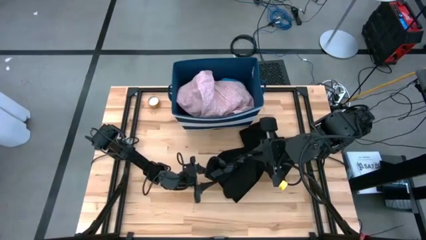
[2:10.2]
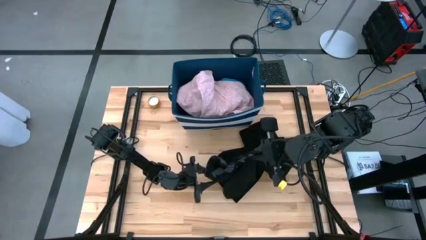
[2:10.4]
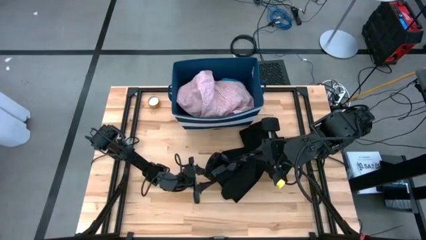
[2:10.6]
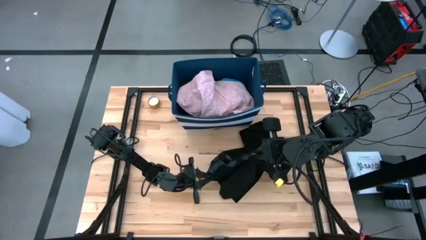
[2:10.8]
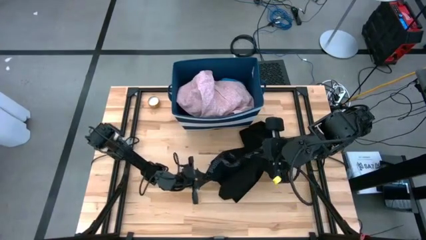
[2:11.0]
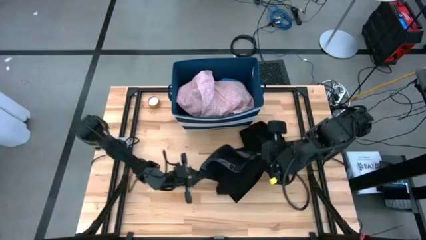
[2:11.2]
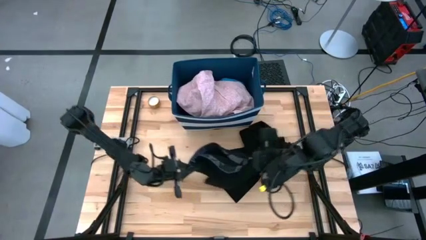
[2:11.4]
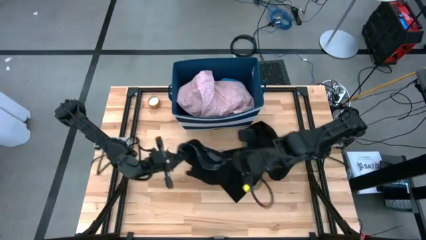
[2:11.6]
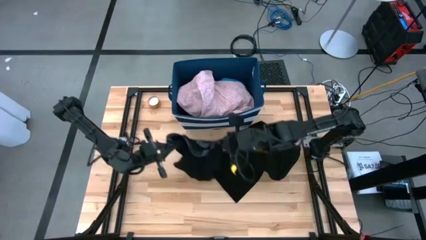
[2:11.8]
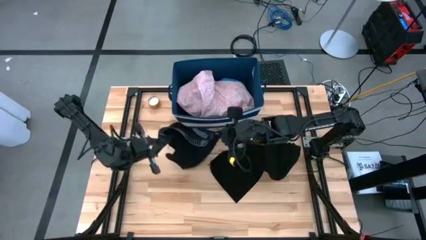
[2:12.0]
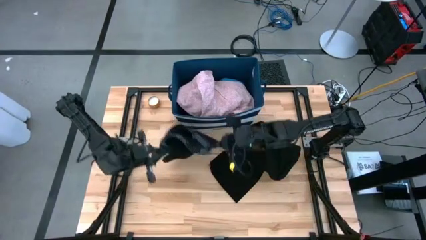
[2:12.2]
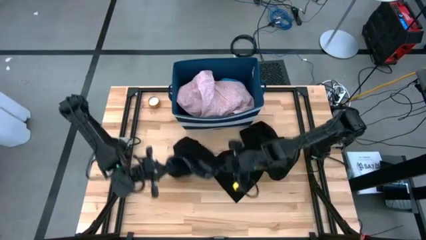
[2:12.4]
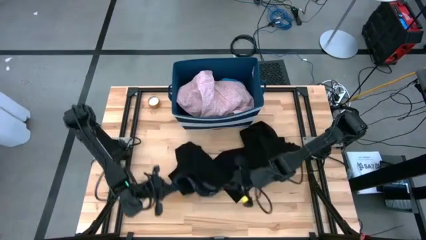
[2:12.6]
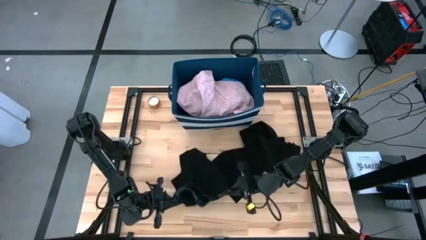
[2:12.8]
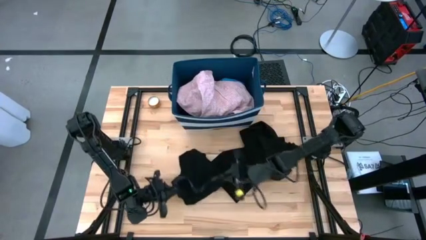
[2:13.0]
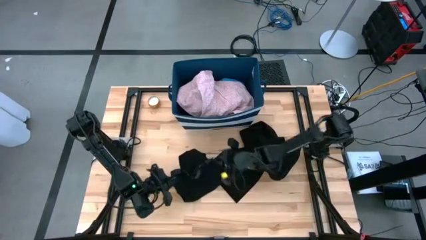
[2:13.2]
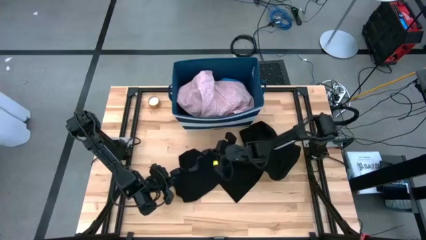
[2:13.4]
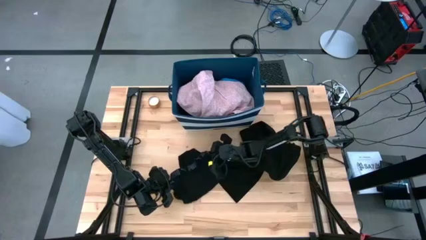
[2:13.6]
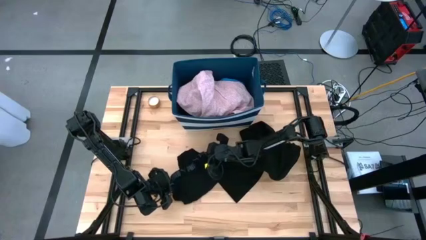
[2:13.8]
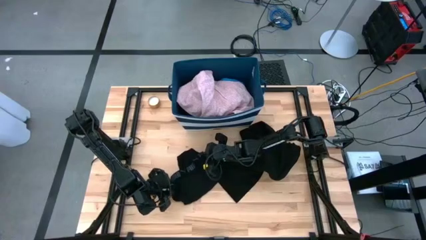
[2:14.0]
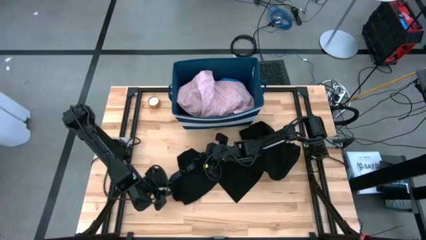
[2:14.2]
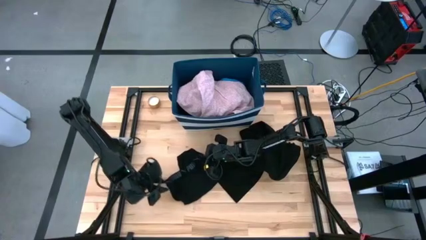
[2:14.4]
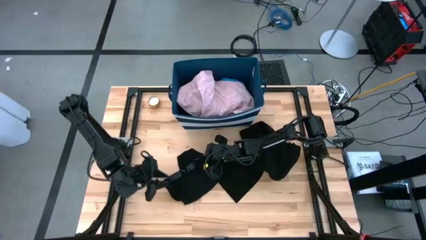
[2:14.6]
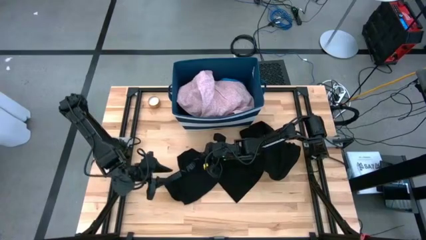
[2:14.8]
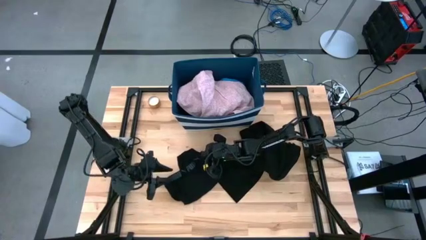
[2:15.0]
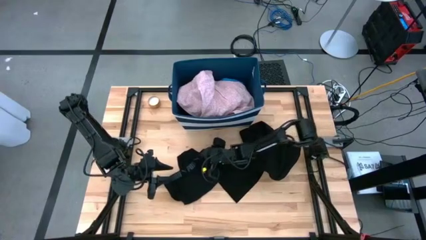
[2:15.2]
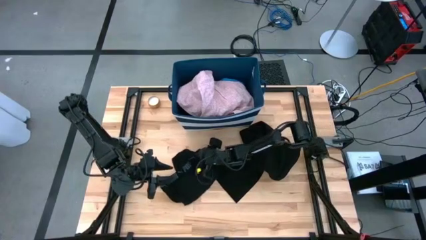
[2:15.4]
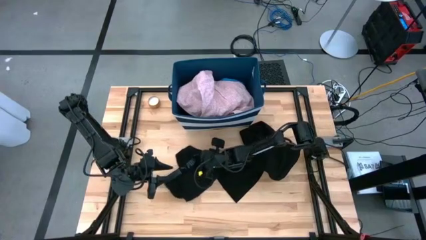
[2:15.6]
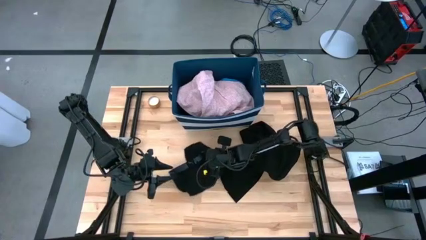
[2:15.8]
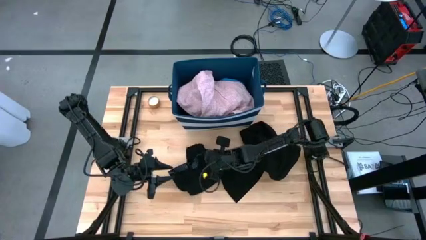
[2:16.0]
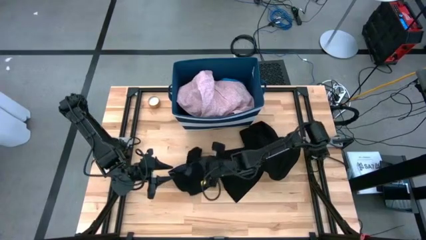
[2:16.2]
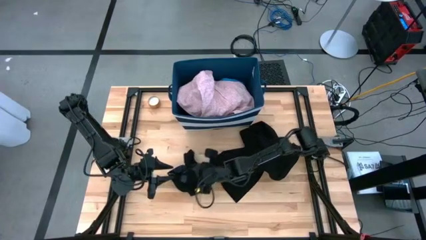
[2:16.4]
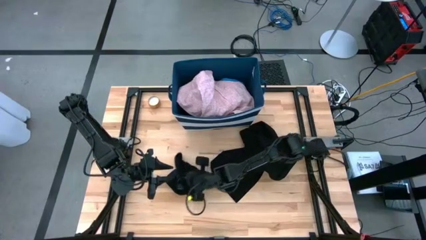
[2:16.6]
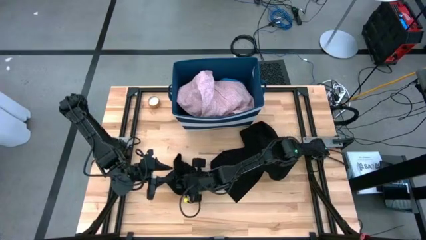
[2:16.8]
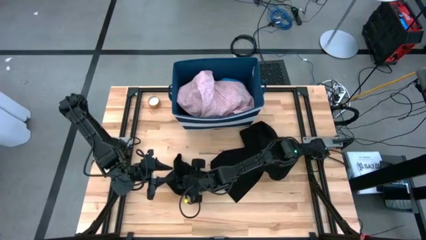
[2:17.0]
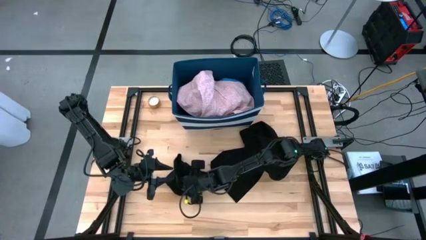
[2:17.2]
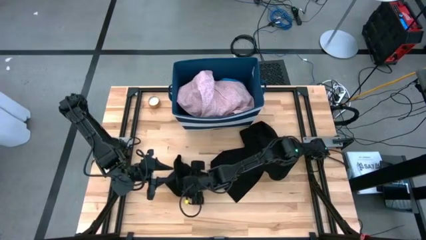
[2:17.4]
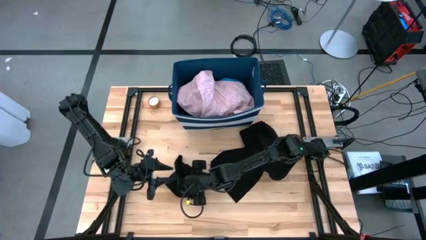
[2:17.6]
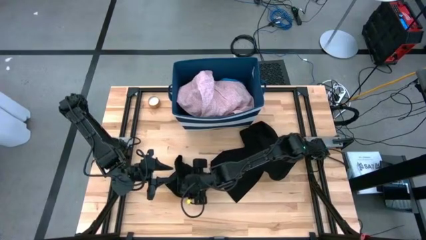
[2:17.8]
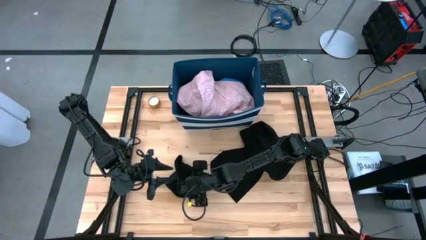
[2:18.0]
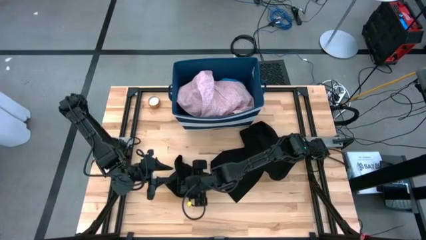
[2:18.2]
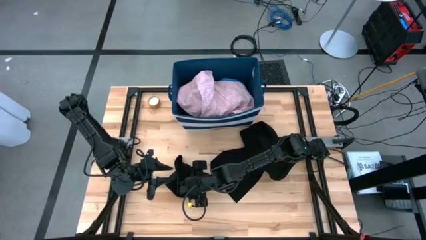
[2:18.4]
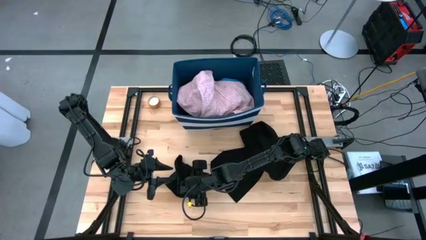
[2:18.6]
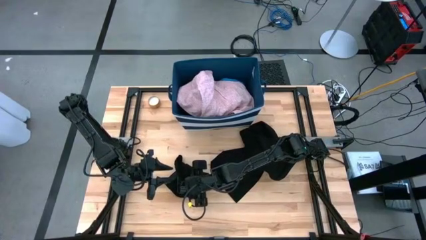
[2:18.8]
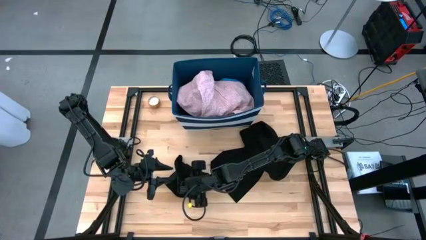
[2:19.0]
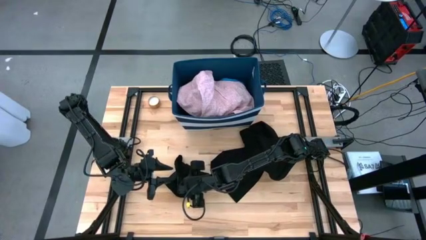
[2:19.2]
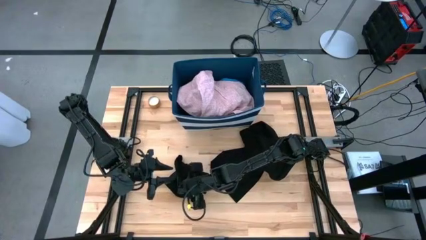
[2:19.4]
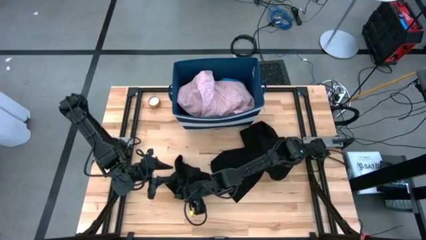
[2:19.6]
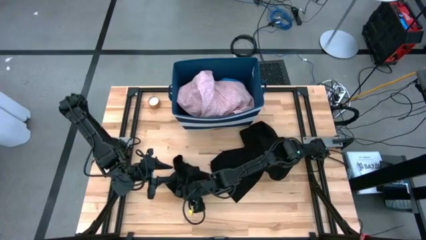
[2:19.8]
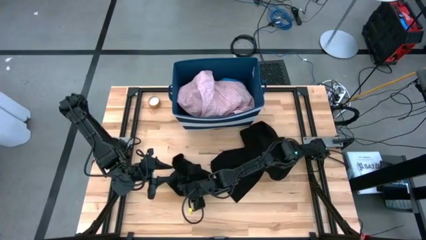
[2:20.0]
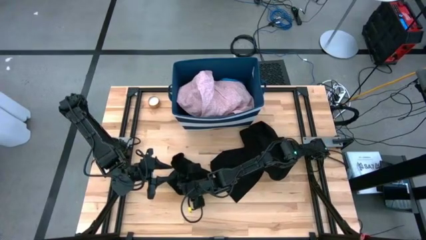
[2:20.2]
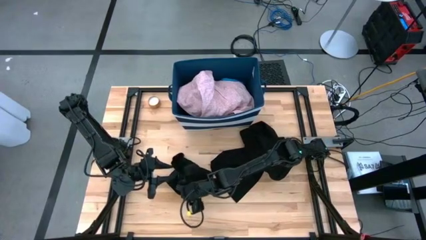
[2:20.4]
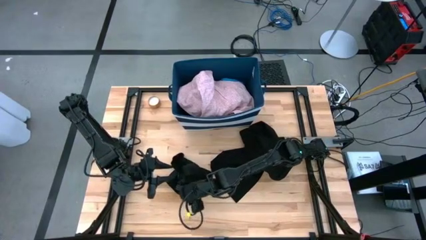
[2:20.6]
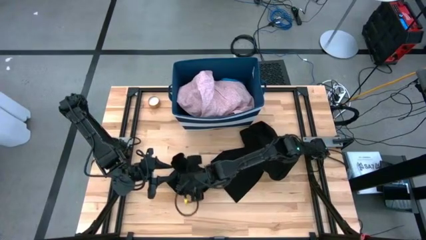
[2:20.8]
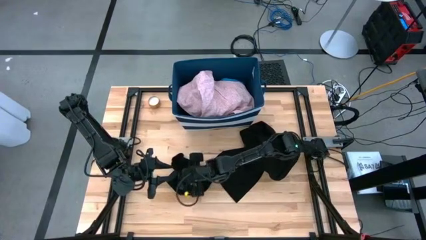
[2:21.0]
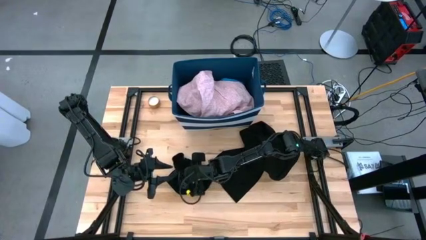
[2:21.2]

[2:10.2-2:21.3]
Task: Sort clothes
Fold the black underwear

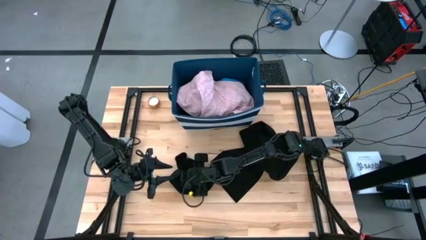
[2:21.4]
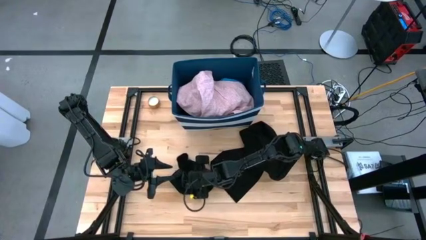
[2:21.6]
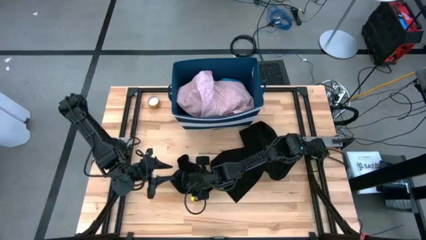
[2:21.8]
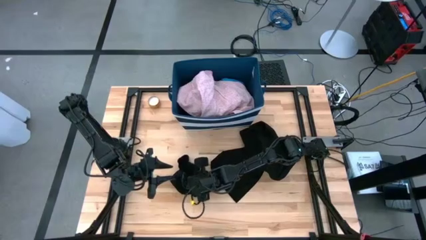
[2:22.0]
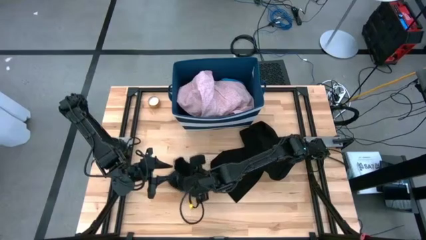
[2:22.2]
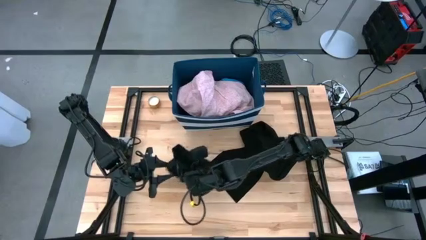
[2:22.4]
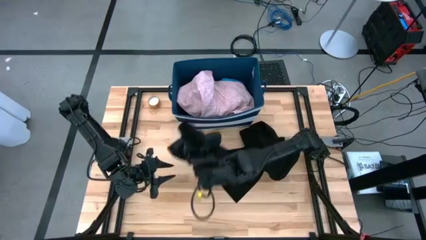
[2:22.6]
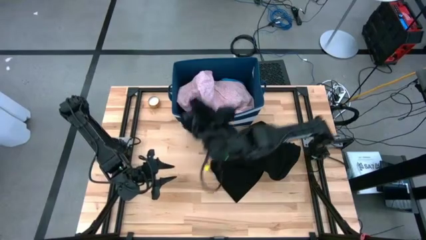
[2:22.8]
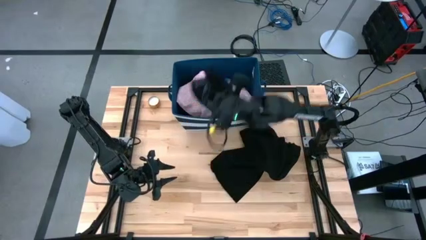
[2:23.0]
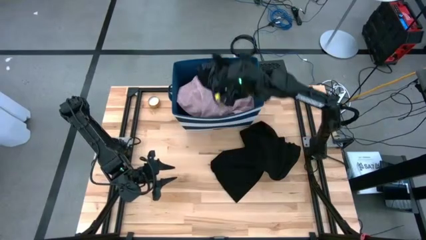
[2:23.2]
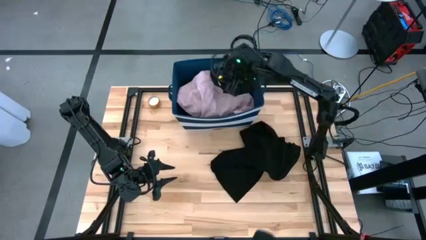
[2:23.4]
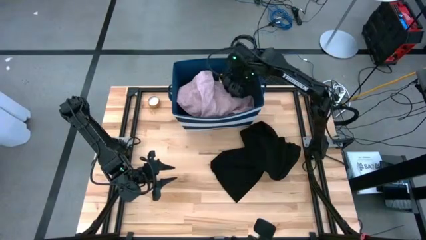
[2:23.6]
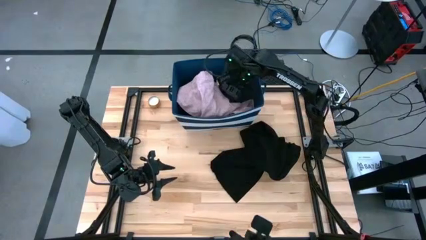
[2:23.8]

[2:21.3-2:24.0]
Put the black underwear into the blue laundry bin

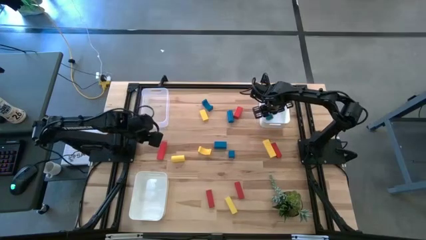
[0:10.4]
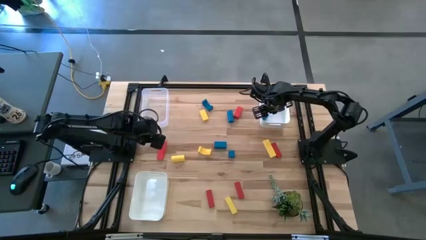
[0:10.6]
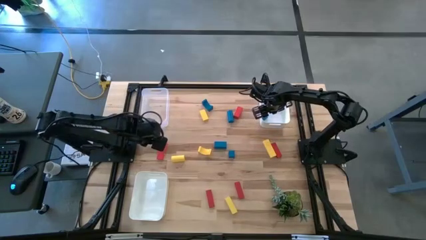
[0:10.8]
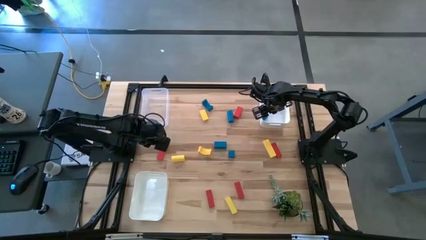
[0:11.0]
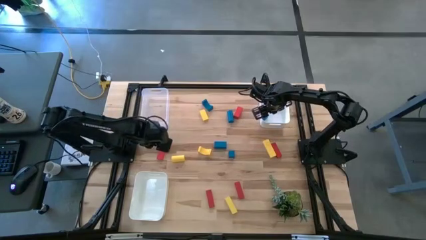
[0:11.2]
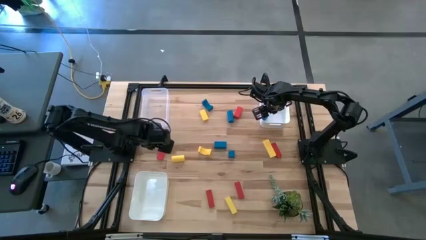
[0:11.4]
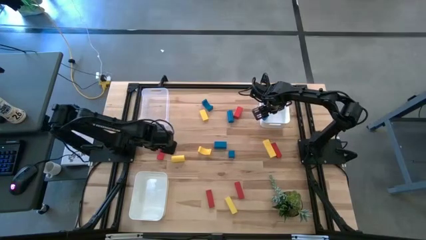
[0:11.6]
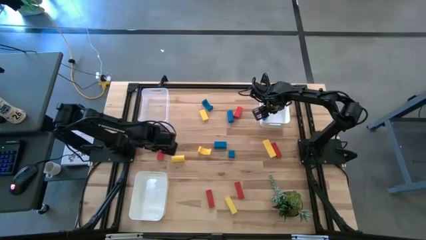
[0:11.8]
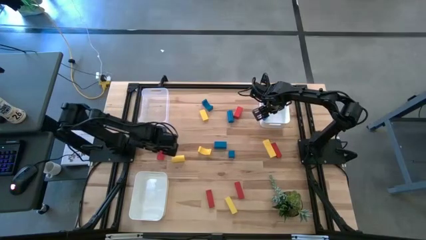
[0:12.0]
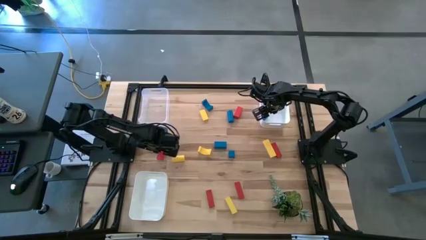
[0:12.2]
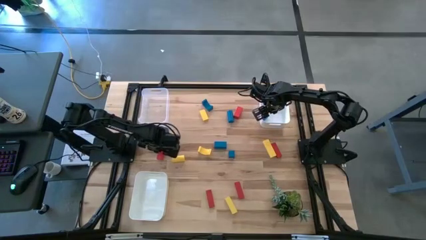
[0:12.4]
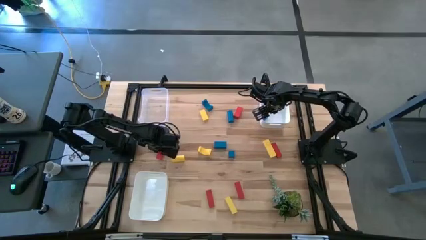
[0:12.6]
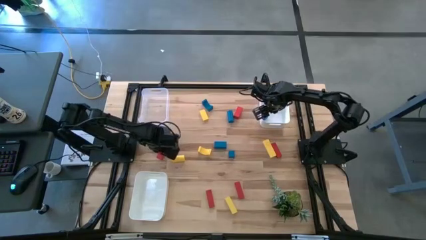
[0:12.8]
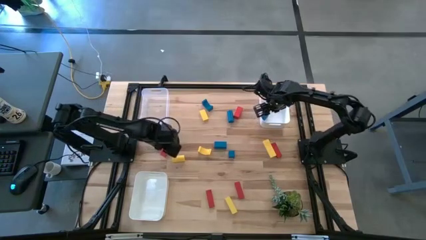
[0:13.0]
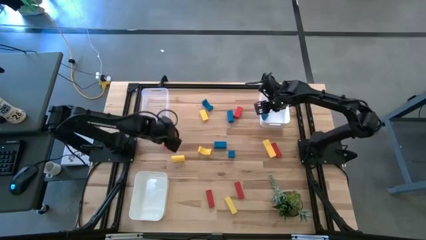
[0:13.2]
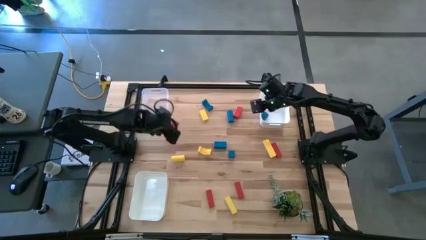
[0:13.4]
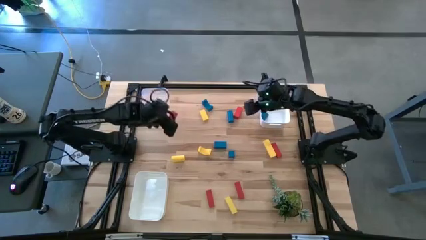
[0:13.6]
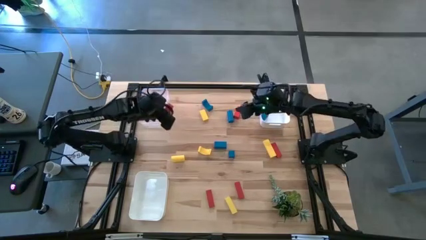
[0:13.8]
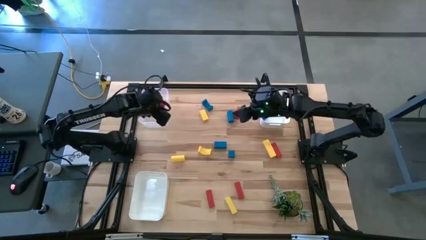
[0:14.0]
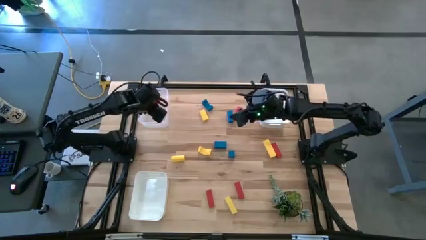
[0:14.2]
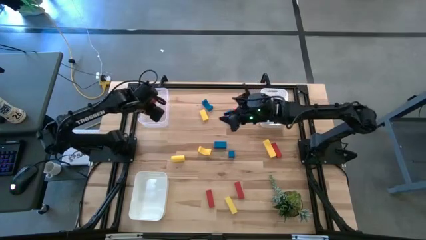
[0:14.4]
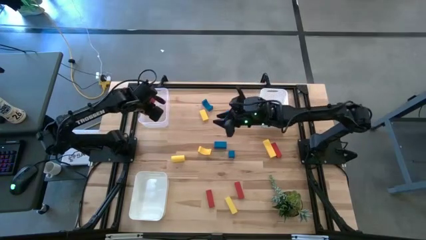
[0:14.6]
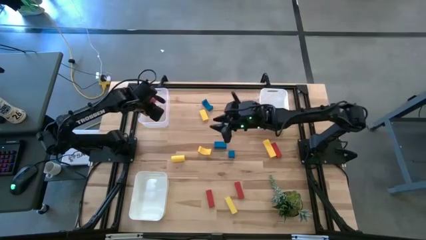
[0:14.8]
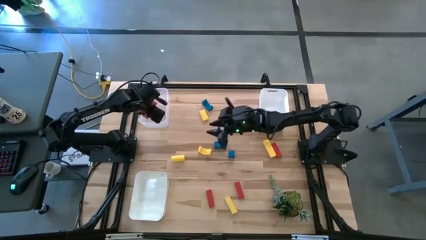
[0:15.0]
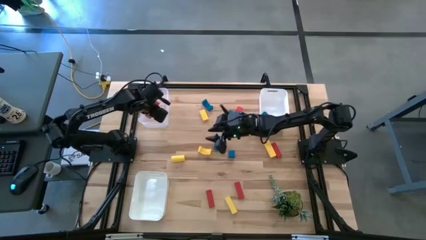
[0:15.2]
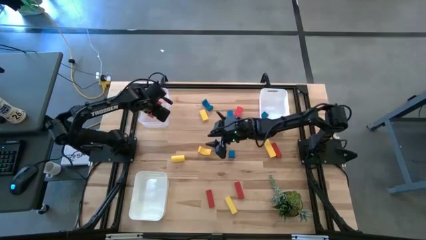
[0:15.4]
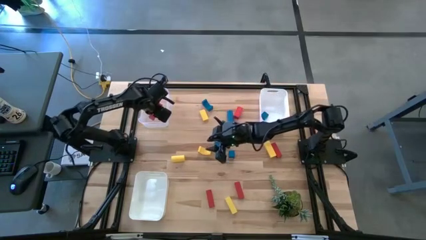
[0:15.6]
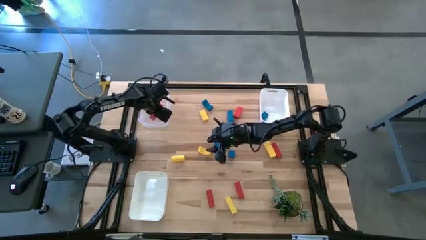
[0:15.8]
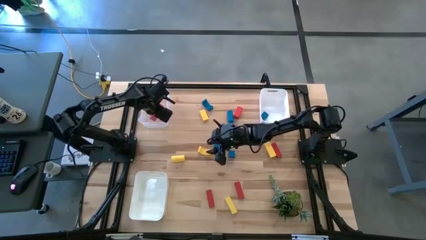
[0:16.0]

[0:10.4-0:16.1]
Task: Sort & place blocks by color
Put the red block into the transparent bin
